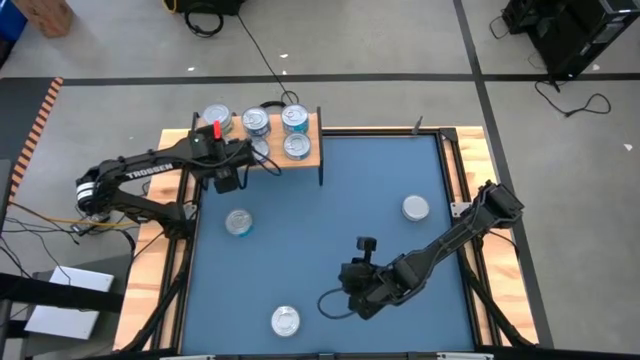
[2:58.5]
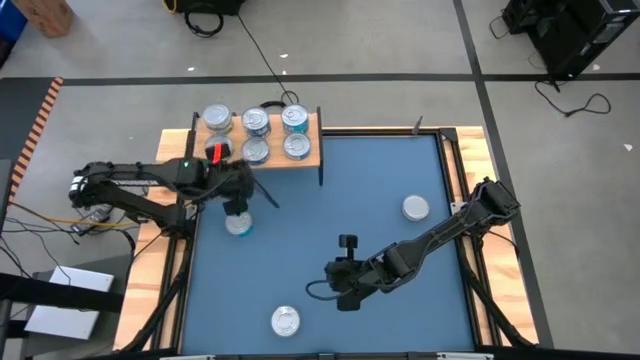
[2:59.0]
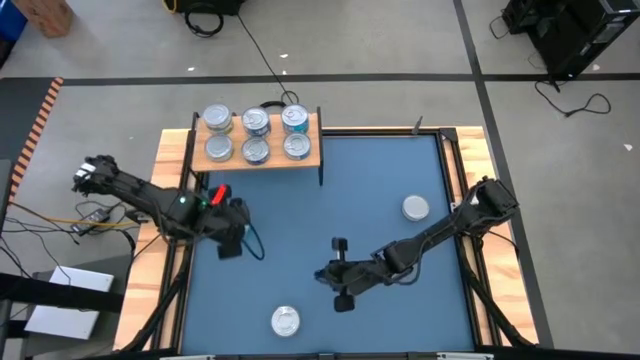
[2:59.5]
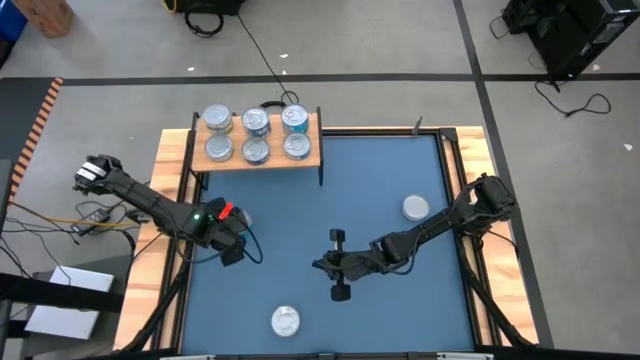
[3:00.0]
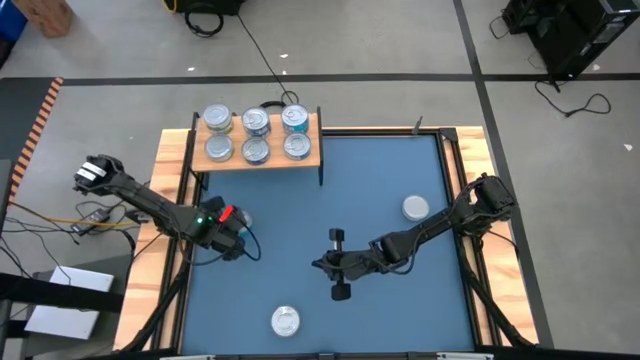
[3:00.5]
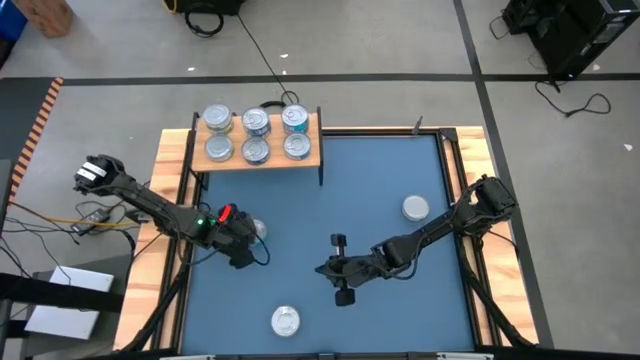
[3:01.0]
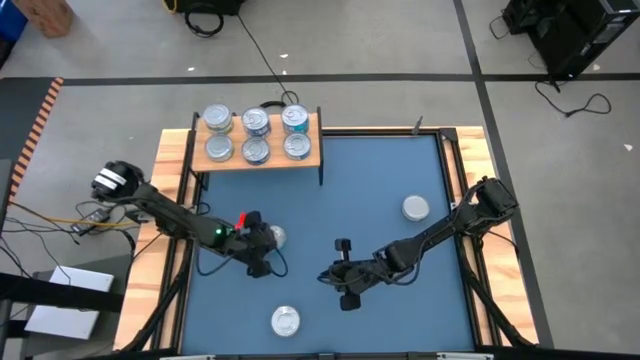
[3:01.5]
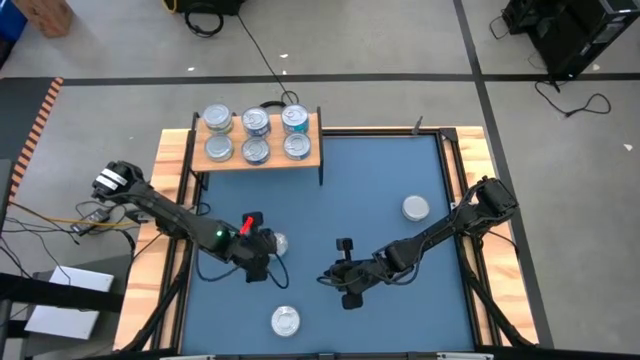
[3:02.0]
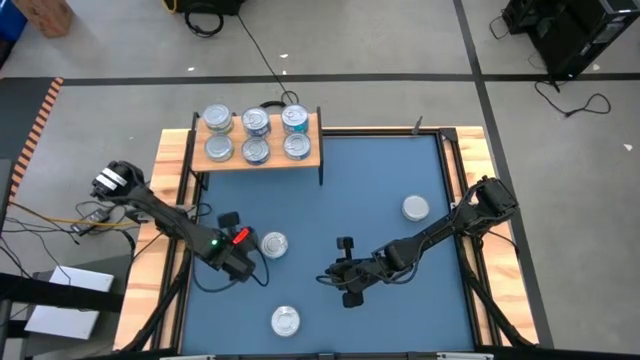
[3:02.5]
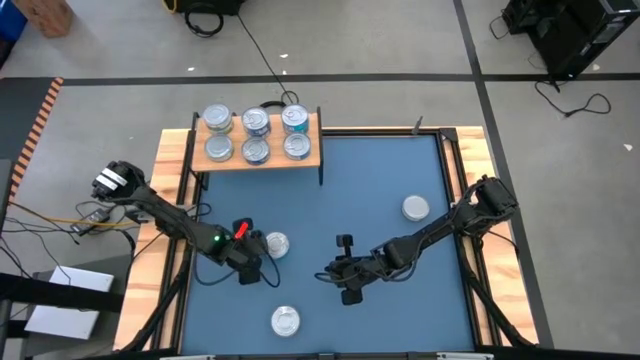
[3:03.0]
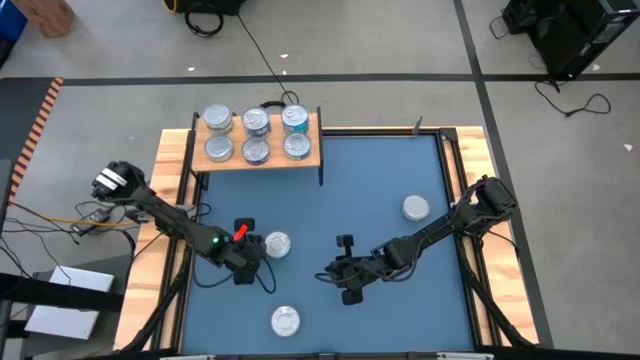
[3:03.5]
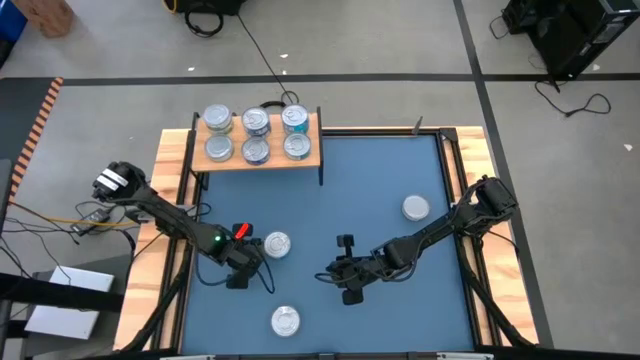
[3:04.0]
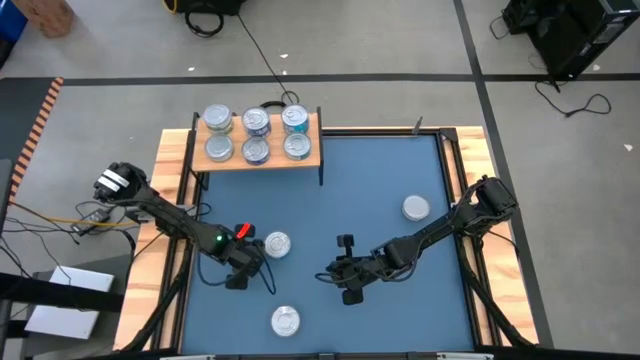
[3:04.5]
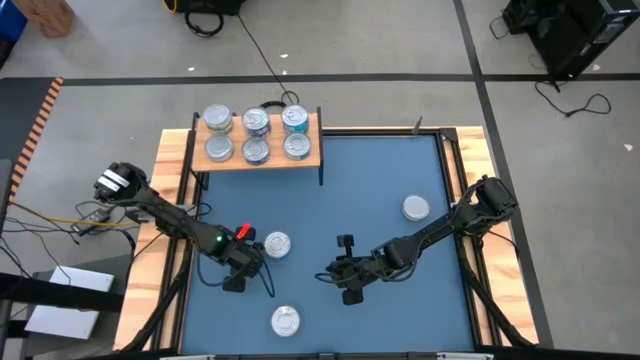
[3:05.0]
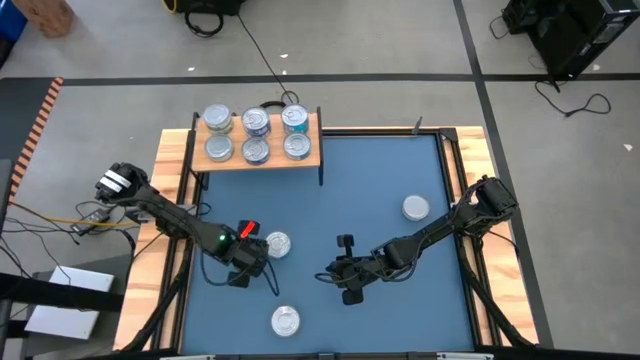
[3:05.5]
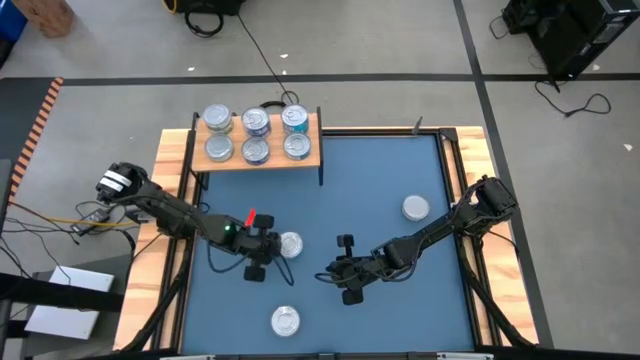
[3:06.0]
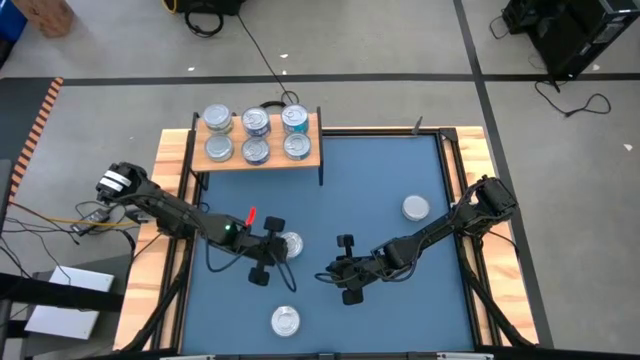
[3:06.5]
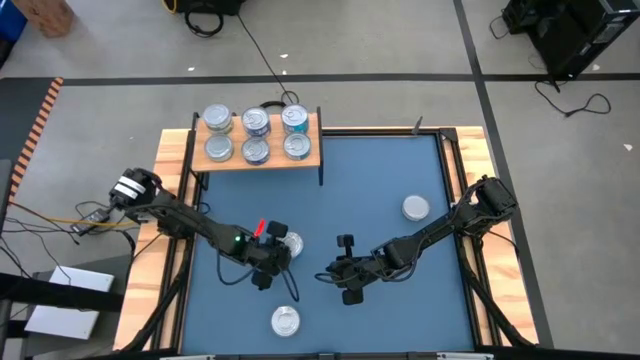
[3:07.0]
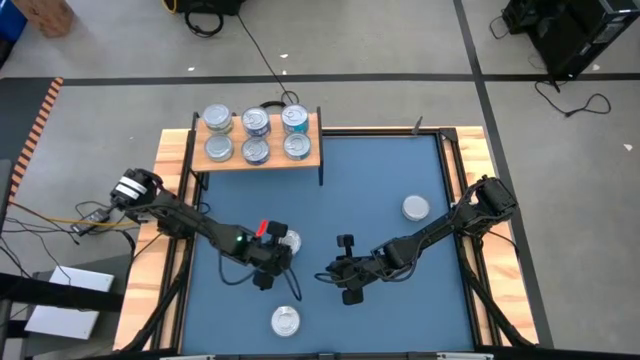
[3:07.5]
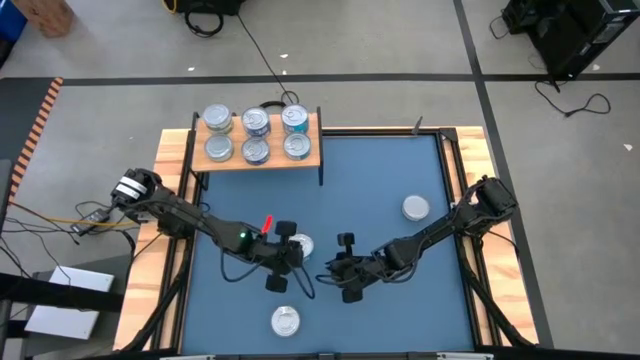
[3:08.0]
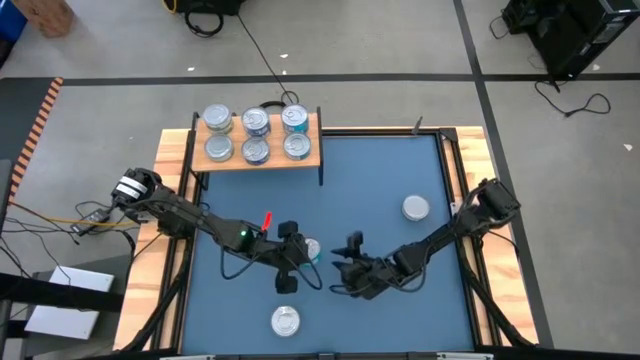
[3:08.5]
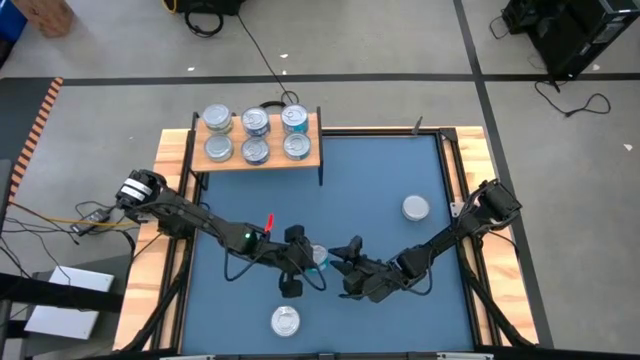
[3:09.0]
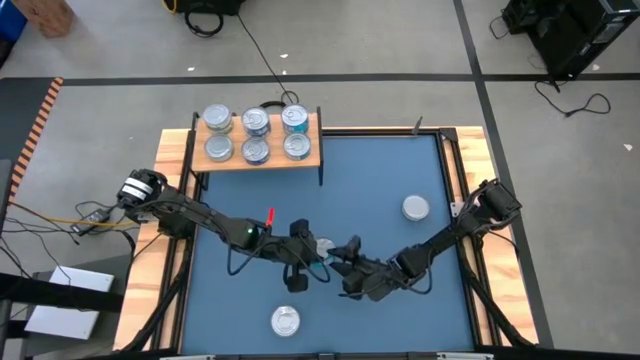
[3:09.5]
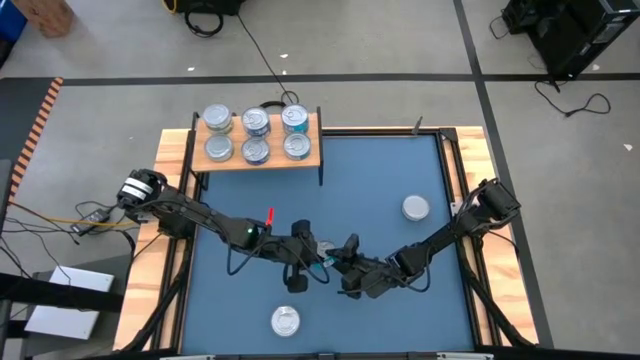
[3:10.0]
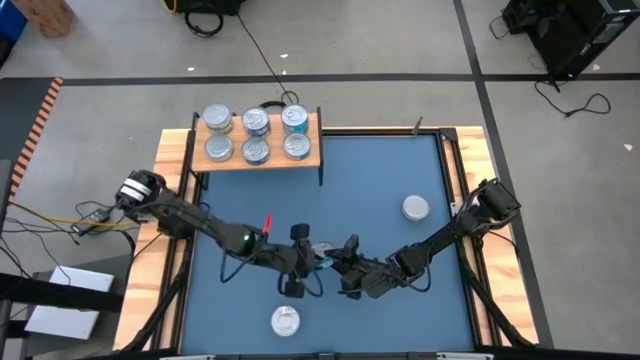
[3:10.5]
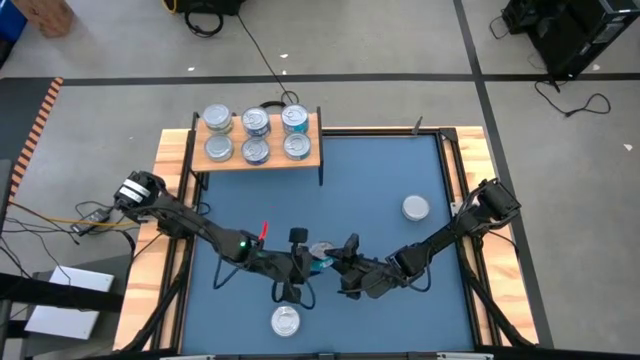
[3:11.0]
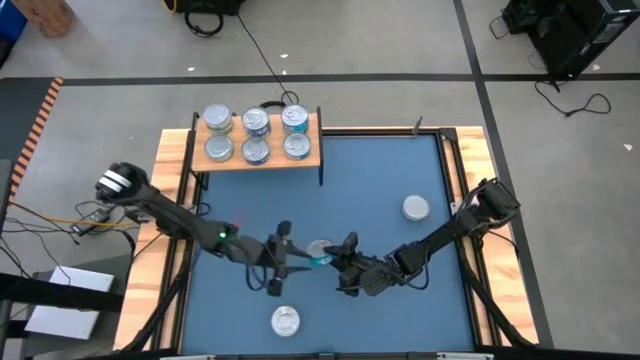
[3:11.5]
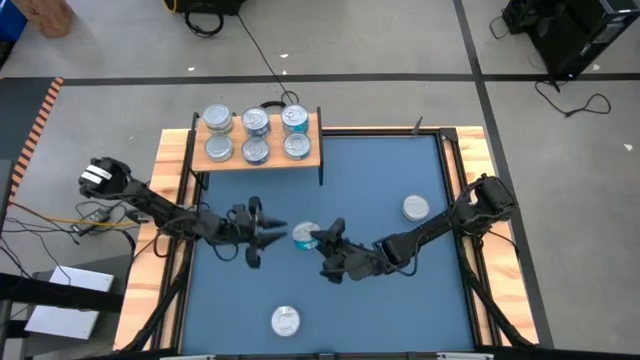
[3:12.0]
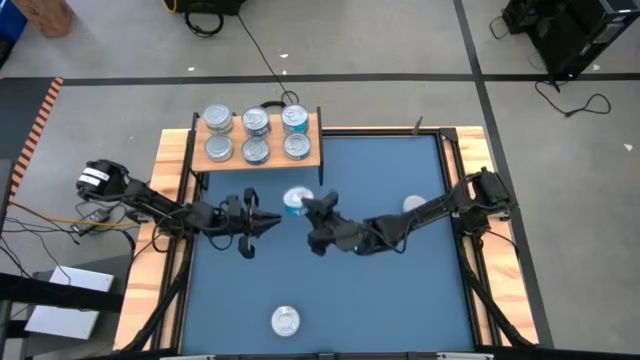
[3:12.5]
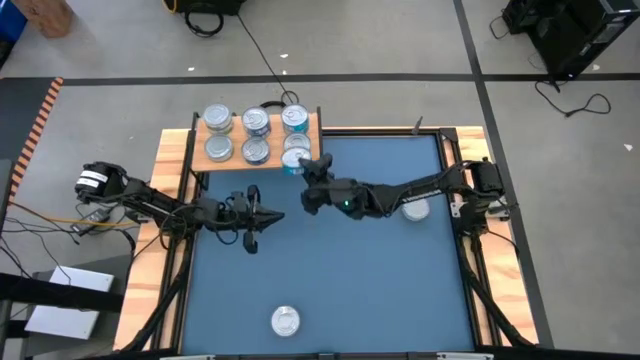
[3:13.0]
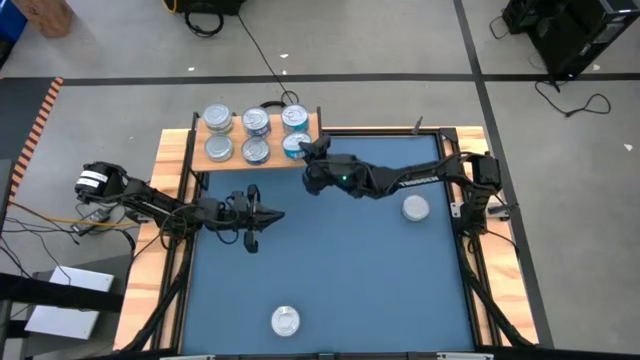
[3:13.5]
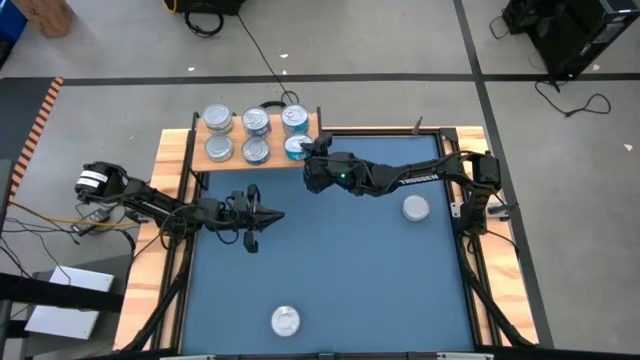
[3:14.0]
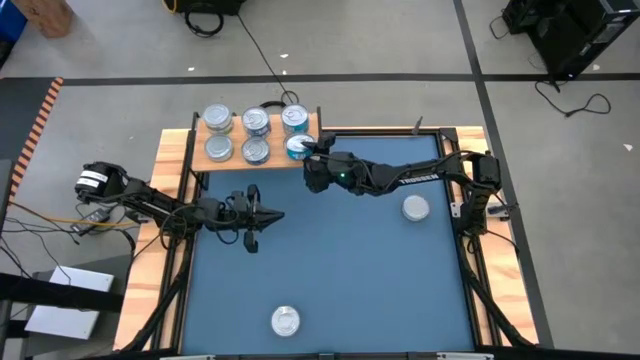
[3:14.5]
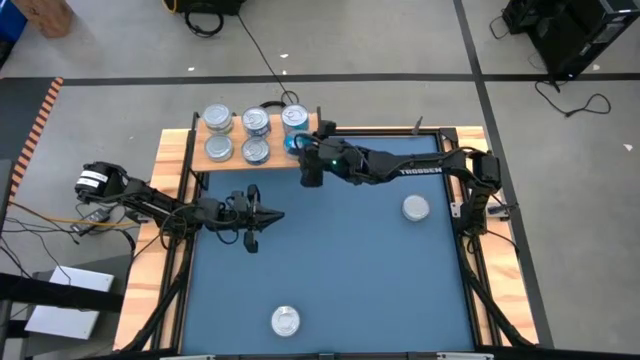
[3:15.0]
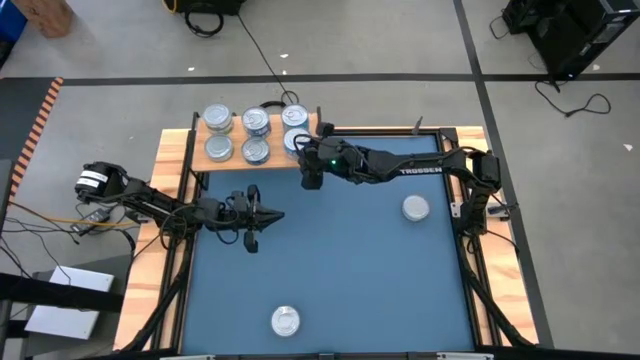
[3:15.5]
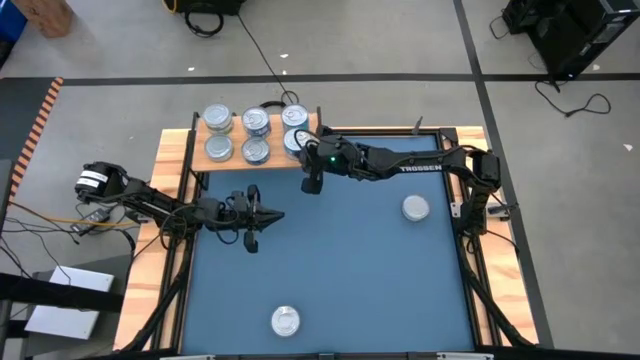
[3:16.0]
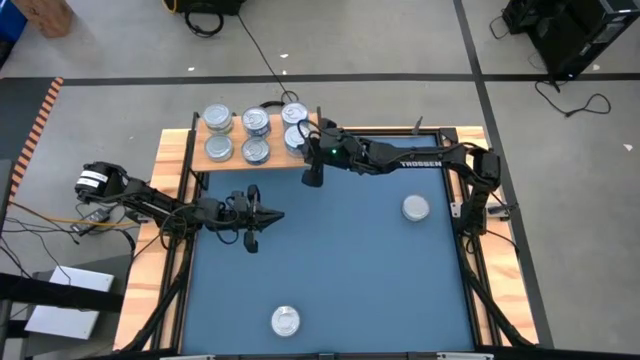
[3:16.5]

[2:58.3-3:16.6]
Task: Stack canned seafood by type on shelf
Stack the yellow blue tuna can on top of the yellow blue tuna can on the shelf

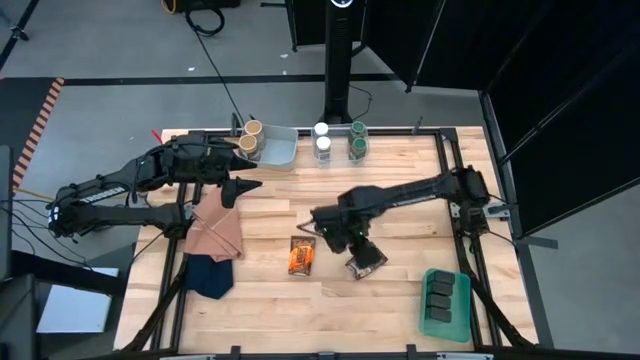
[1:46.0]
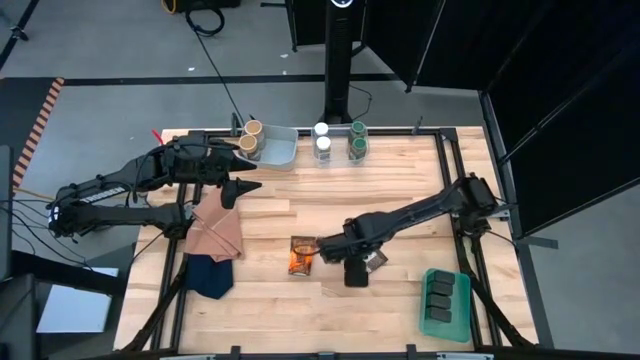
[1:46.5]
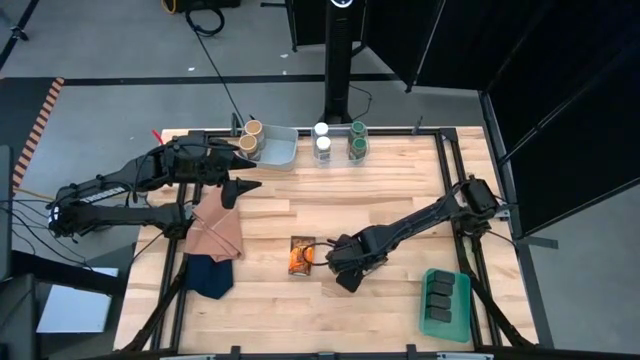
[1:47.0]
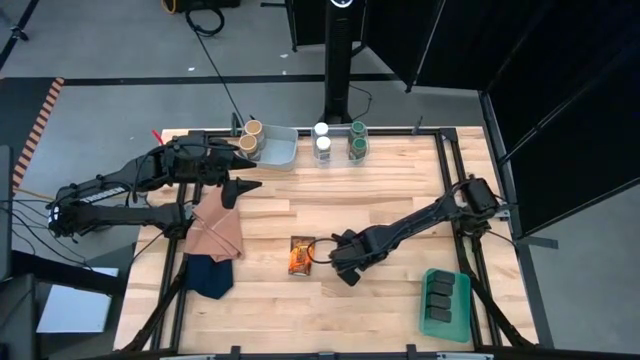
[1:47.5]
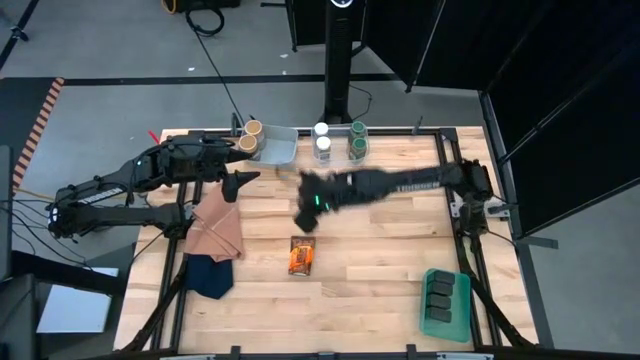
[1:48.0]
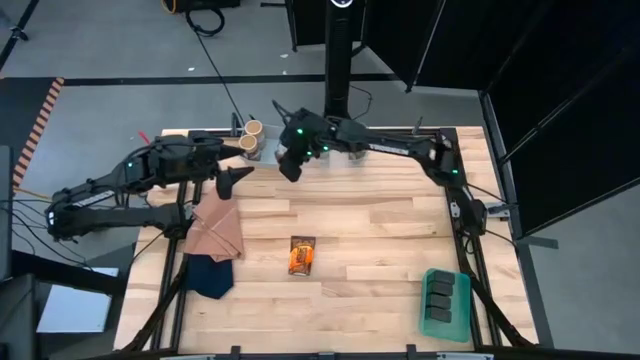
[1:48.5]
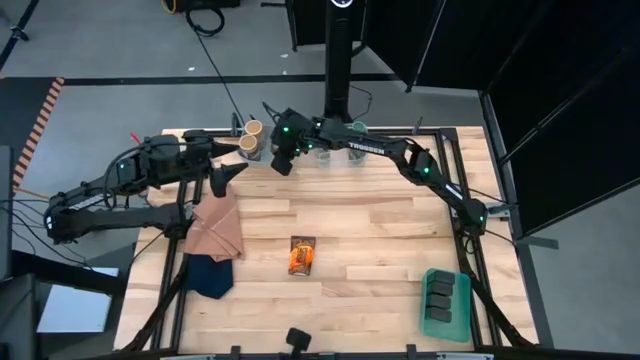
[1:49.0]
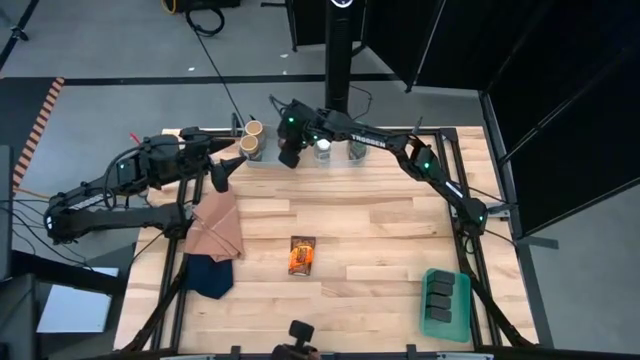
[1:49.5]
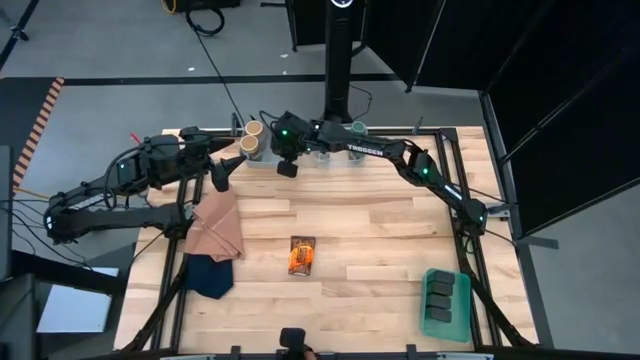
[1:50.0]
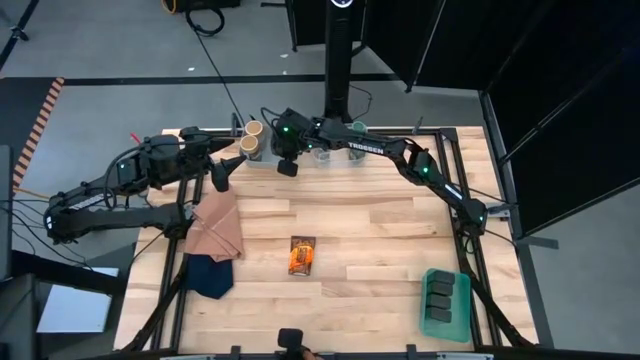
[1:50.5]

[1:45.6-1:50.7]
Task: Sort spices by type
Put the right orange seasoning pack into the gray bin
